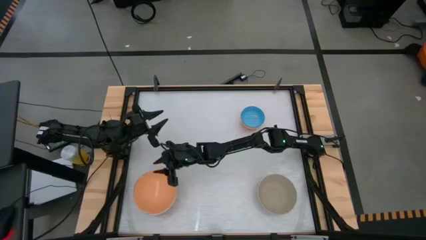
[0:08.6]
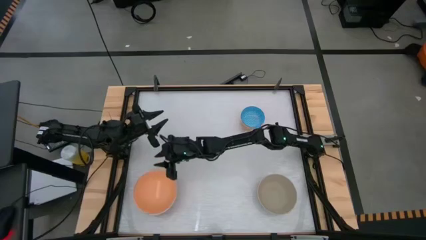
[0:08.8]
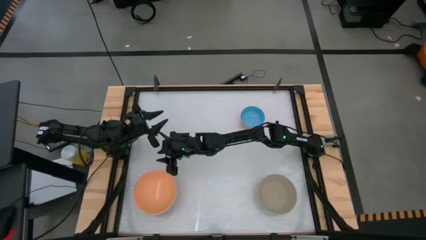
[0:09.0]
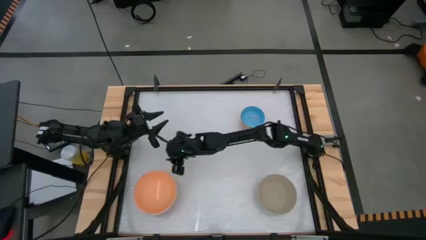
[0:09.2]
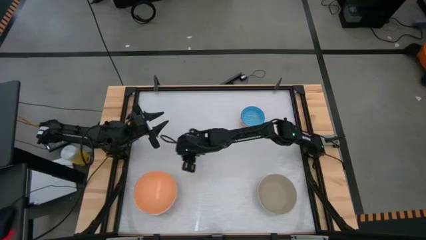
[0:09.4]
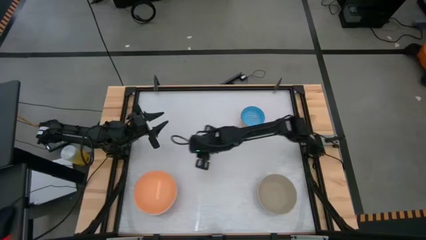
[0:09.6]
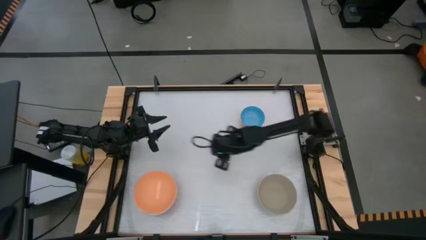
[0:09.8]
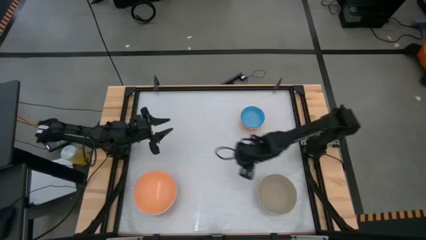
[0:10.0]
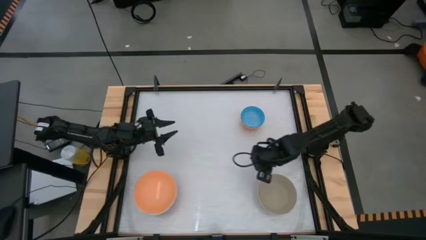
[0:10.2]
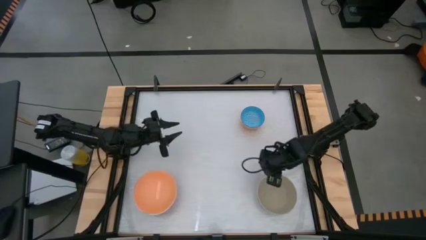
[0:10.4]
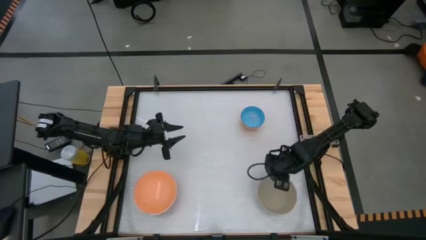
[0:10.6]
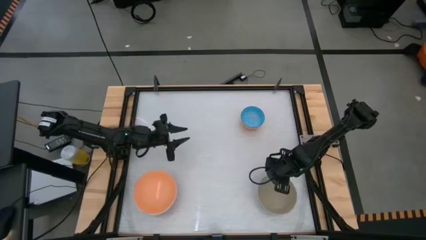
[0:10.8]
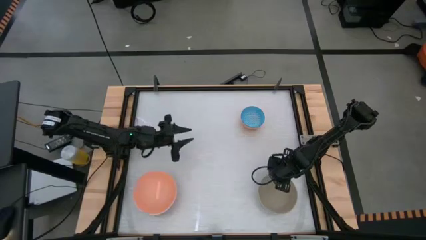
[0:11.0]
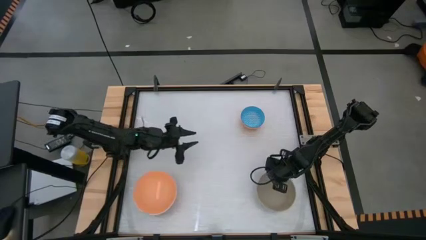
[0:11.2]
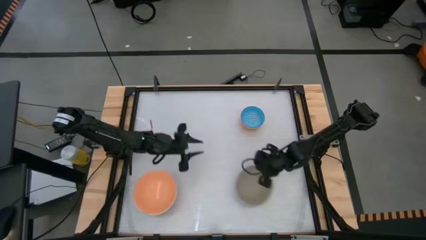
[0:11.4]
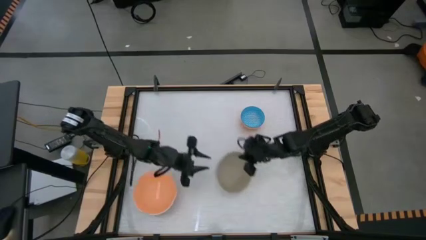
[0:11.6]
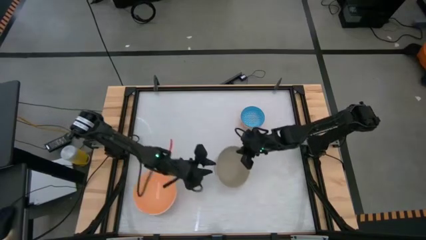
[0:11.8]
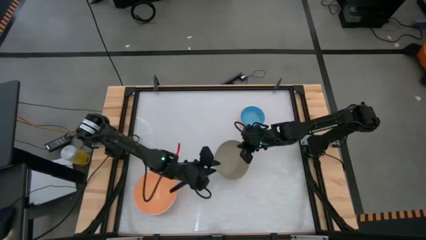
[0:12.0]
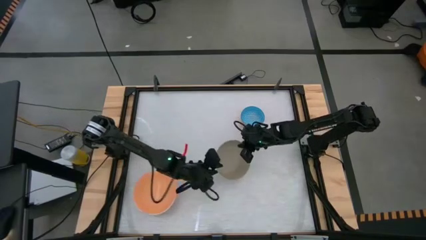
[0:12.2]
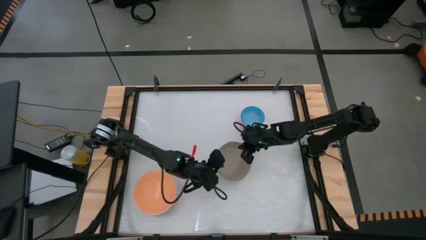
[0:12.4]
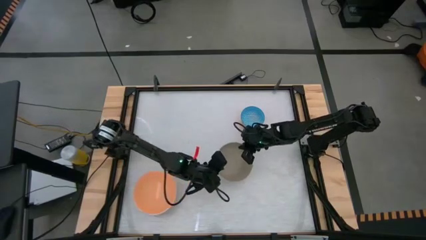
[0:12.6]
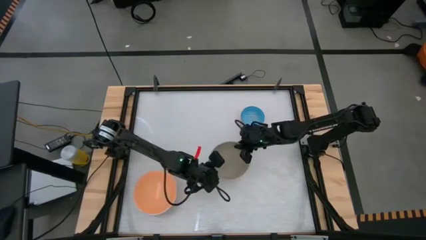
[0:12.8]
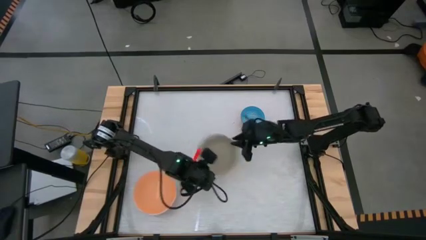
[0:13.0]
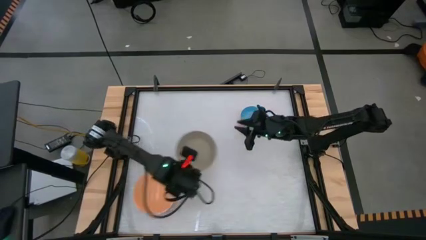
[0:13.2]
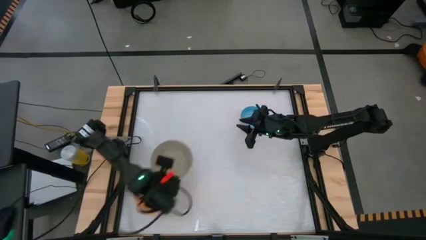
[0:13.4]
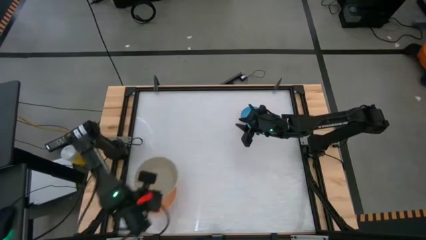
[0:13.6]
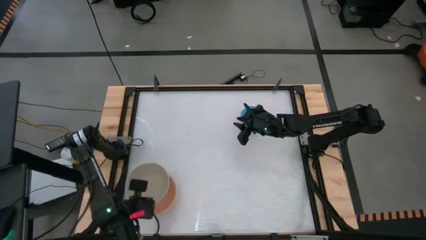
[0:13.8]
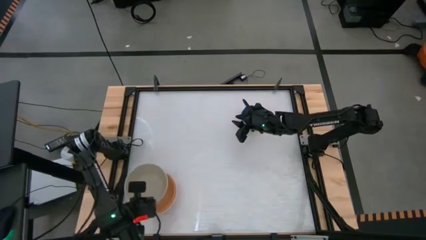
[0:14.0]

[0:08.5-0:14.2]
Stack the gray bowl into the orange bowl

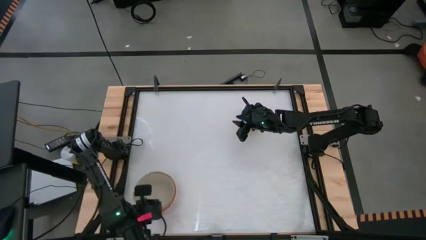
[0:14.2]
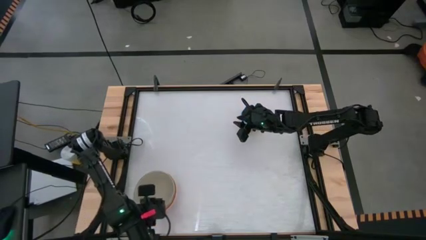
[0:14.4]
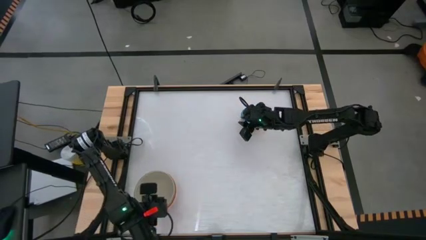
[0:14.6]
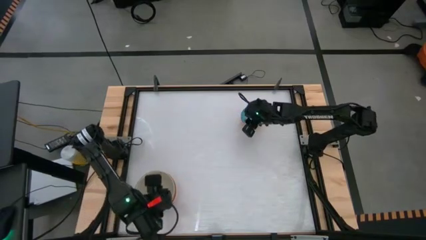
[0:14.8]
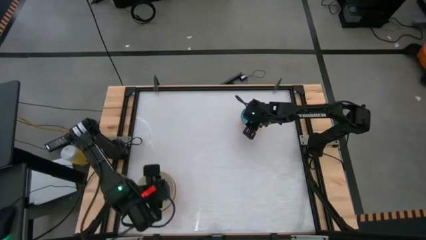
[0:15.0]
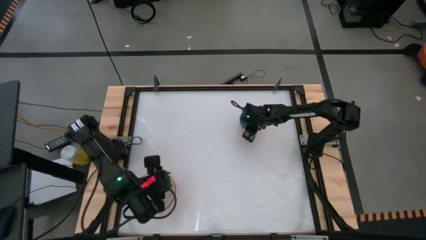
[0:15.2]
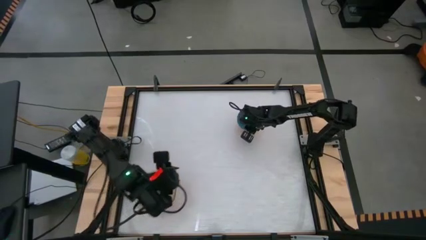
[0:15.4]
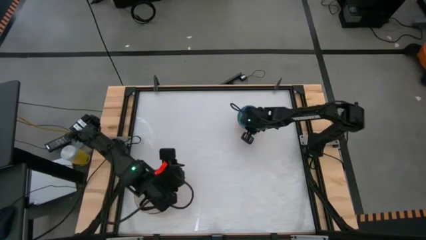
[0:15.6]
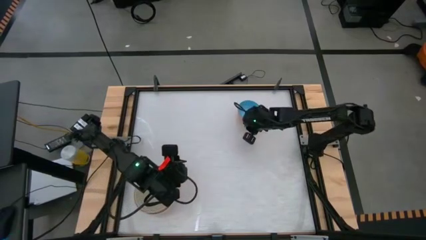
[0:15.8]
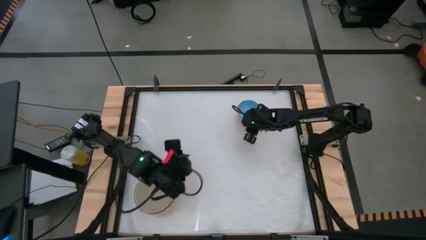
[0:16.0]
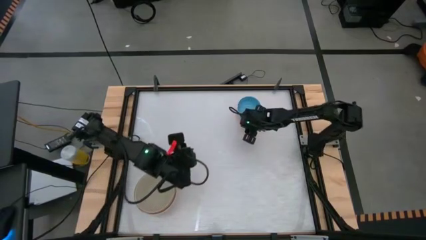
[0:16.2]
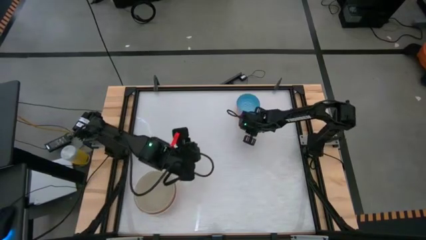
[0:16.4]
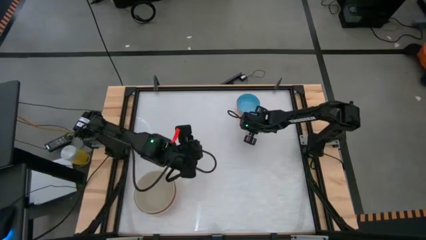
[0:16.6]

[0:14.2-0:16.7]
Stack the blue bowl into the gray bowl

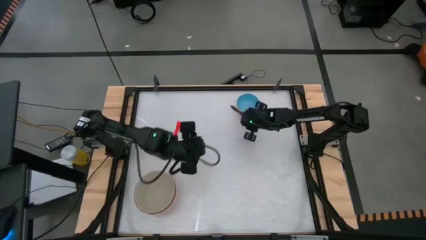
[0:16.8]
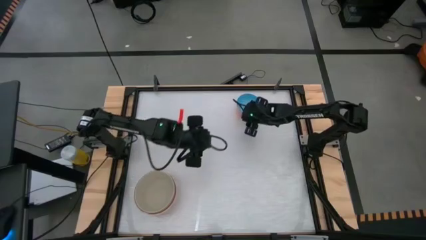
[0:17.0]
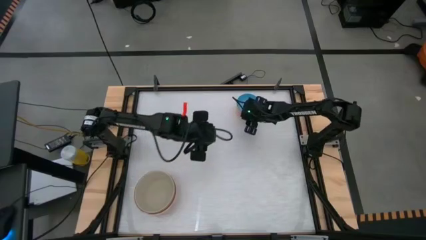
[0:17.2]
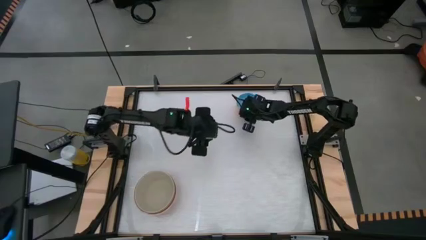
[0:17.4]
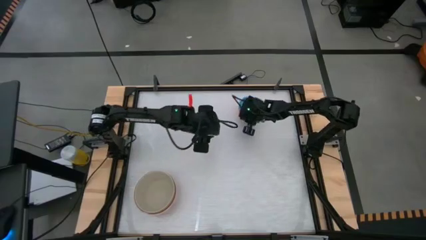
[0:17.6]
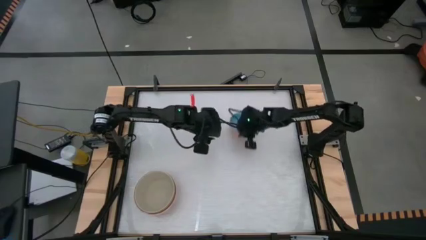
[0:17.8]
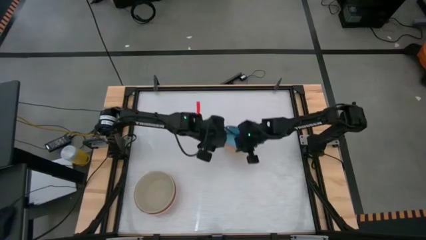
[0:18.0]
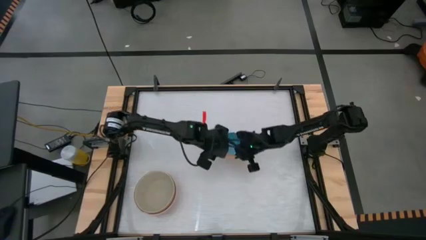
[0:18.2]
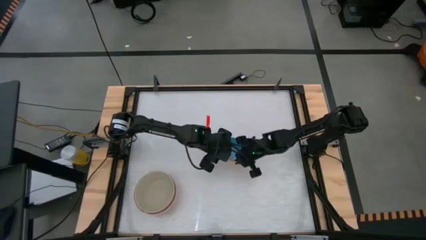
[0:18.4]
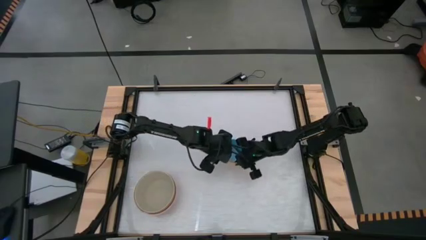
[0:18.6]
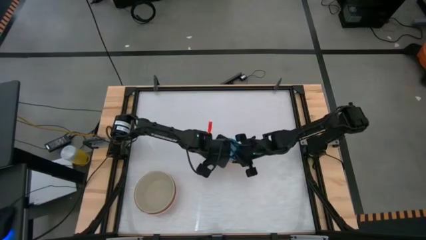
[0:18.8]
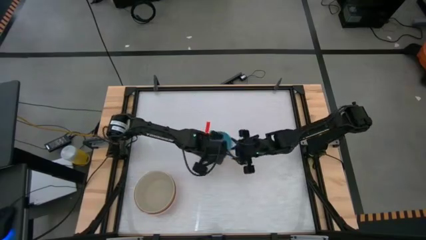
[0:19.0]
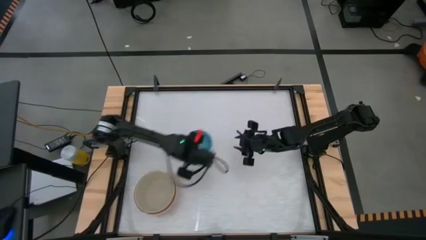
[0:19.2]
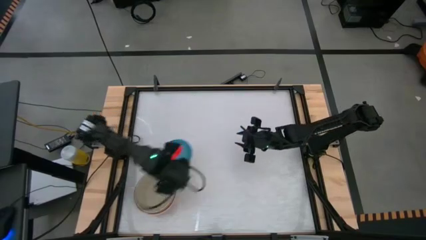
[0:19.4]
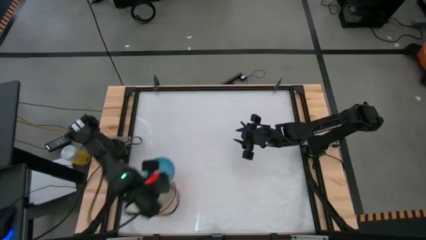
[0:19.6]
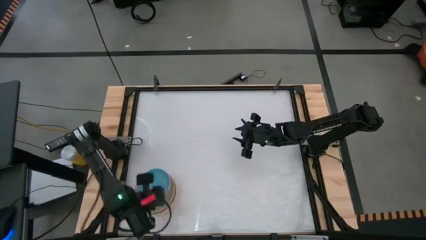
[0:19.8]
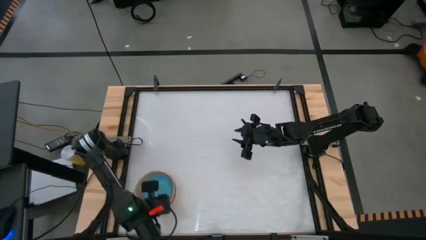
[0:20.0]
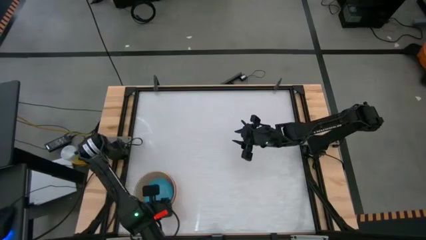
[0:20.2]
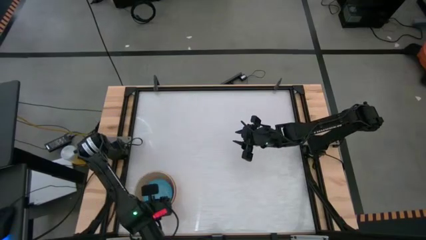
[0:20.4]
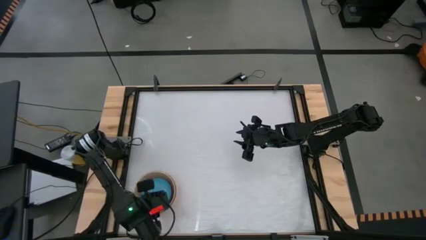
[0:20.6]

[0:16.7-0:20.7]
Stack the blue bowl into the gray bowl
